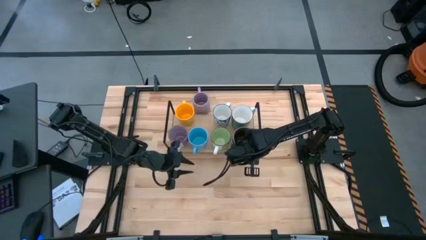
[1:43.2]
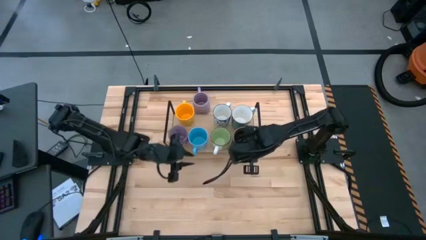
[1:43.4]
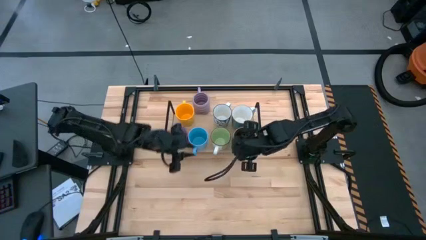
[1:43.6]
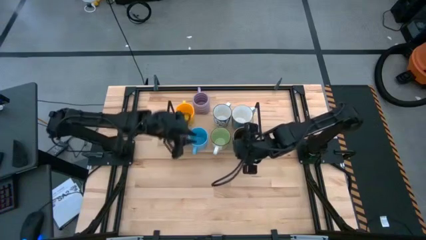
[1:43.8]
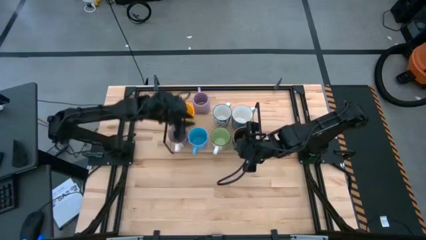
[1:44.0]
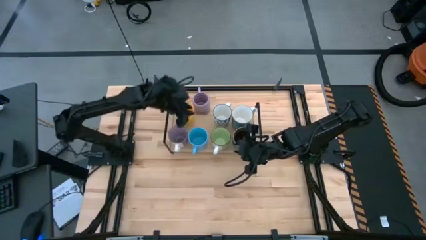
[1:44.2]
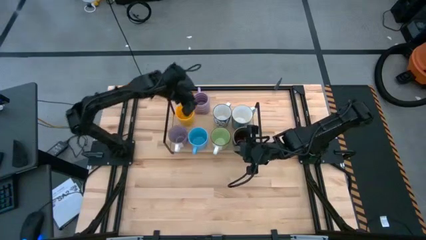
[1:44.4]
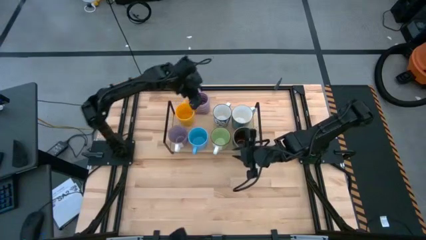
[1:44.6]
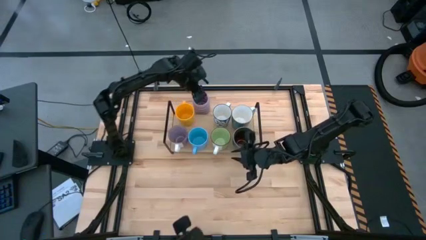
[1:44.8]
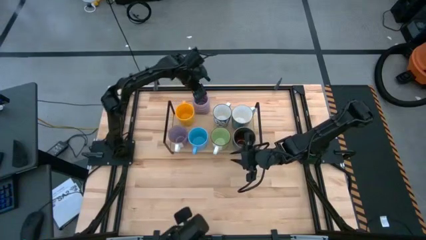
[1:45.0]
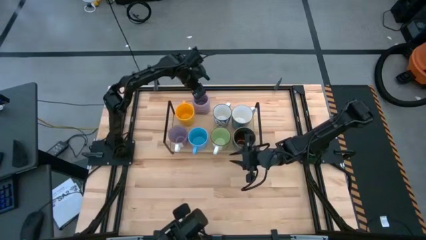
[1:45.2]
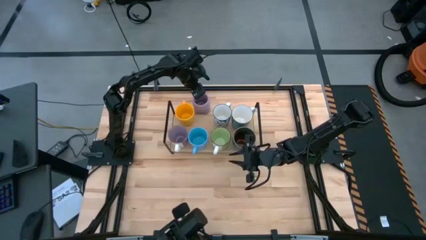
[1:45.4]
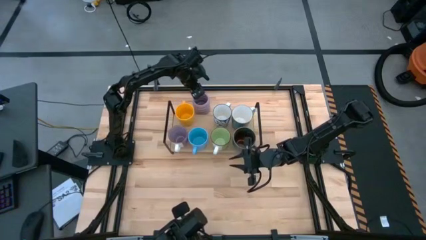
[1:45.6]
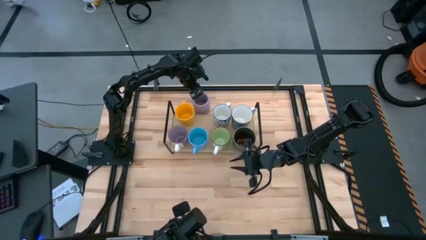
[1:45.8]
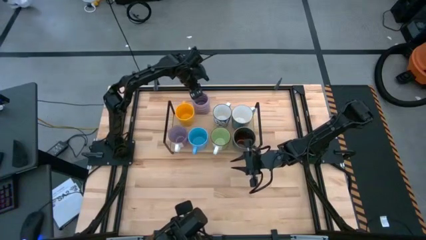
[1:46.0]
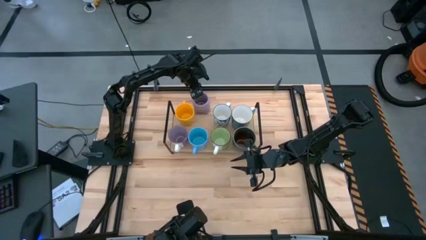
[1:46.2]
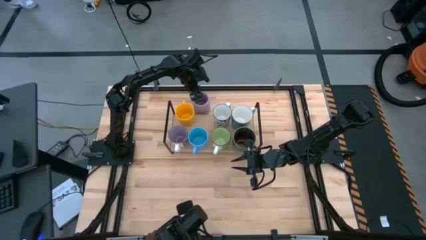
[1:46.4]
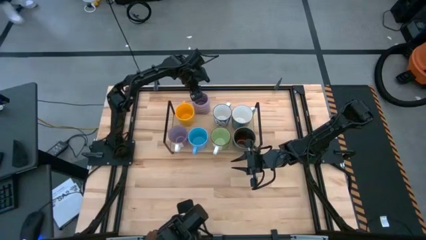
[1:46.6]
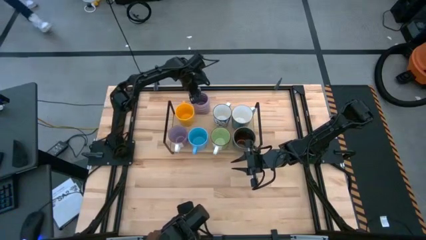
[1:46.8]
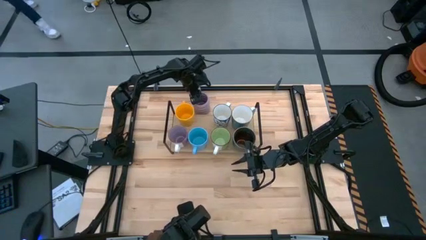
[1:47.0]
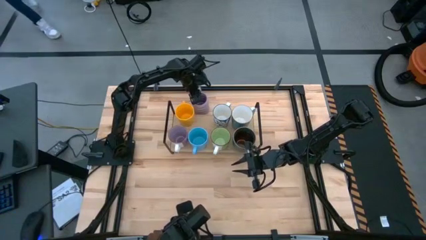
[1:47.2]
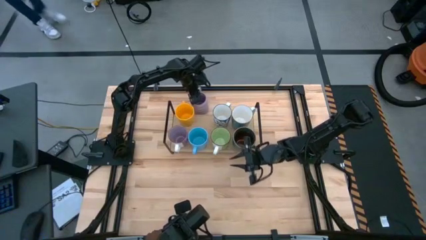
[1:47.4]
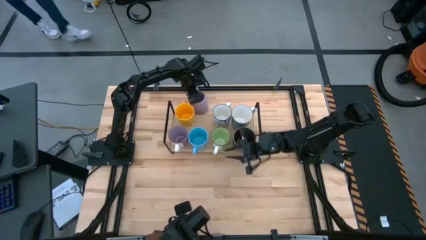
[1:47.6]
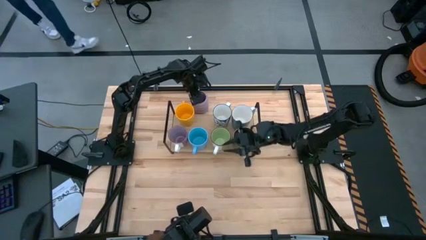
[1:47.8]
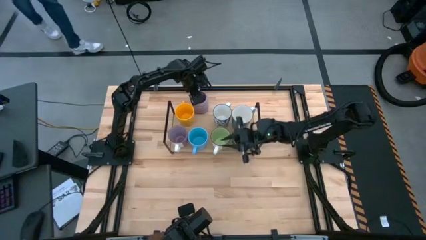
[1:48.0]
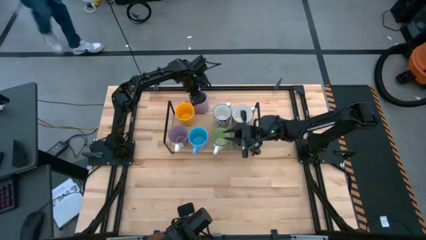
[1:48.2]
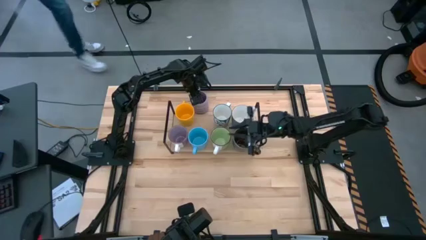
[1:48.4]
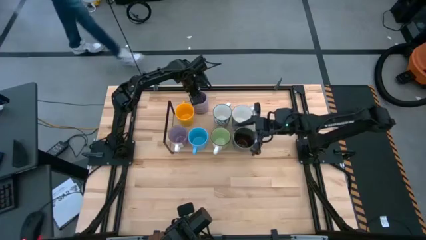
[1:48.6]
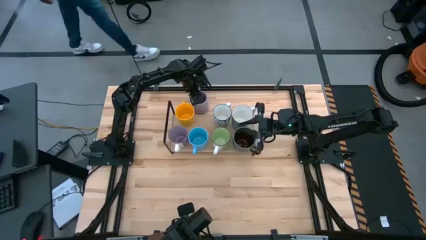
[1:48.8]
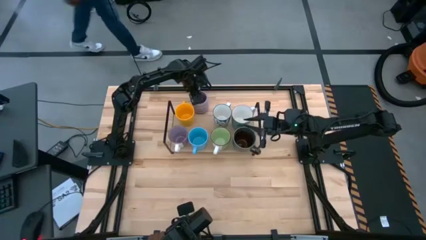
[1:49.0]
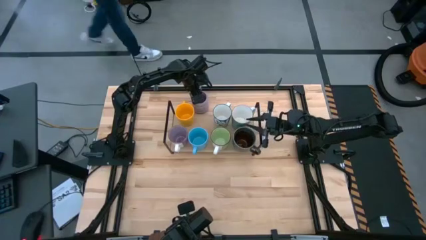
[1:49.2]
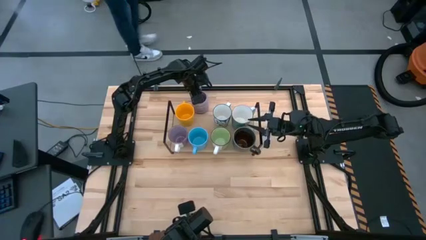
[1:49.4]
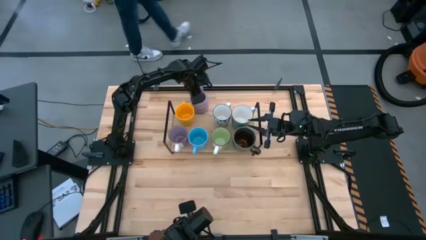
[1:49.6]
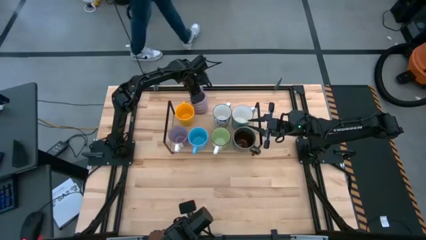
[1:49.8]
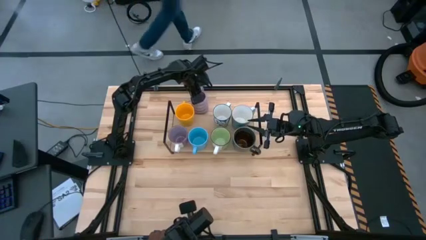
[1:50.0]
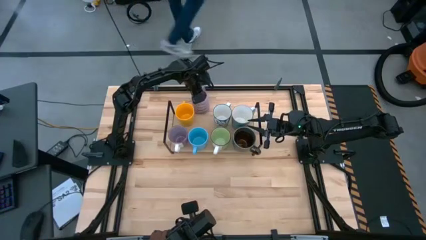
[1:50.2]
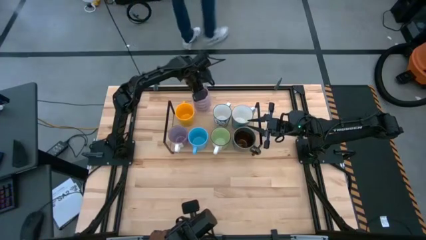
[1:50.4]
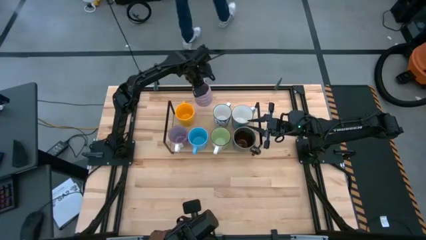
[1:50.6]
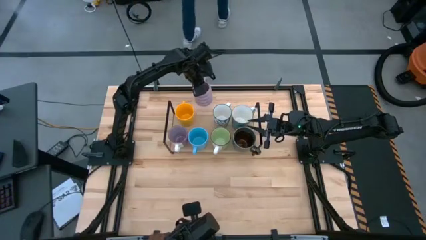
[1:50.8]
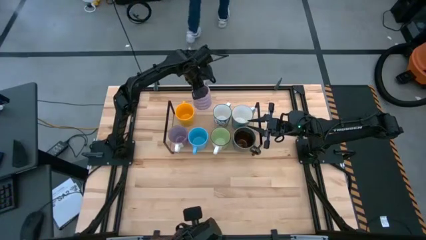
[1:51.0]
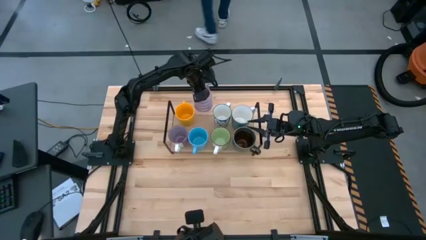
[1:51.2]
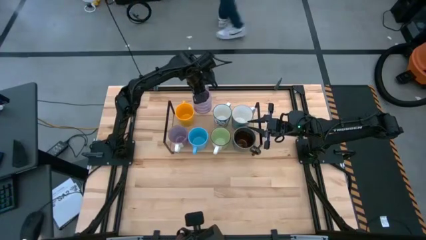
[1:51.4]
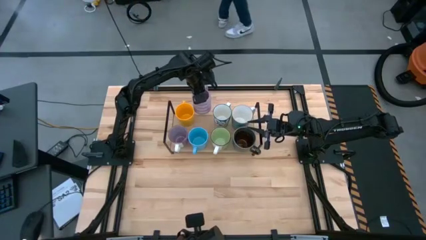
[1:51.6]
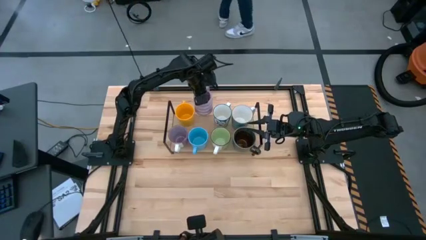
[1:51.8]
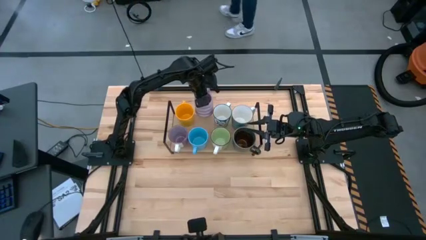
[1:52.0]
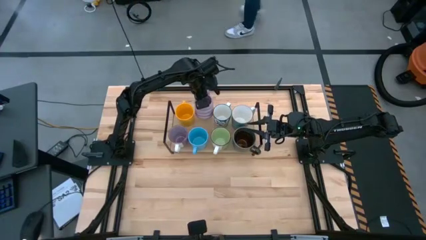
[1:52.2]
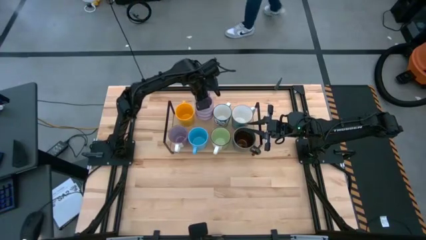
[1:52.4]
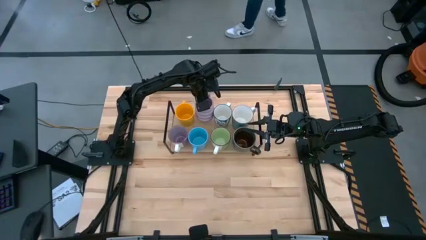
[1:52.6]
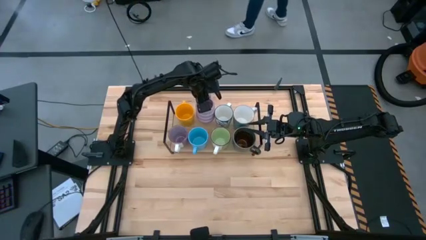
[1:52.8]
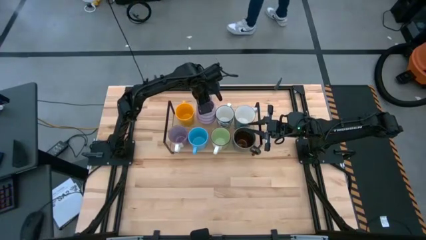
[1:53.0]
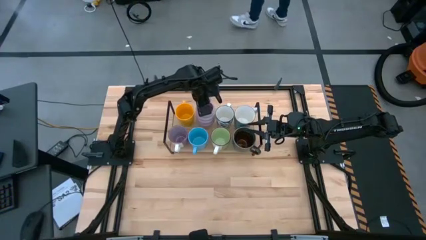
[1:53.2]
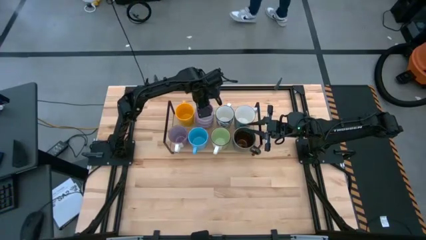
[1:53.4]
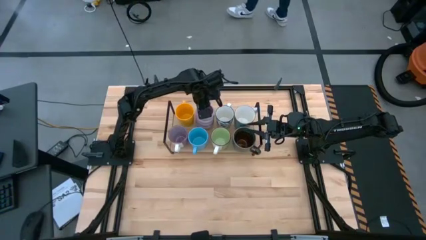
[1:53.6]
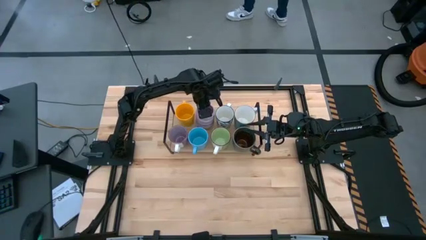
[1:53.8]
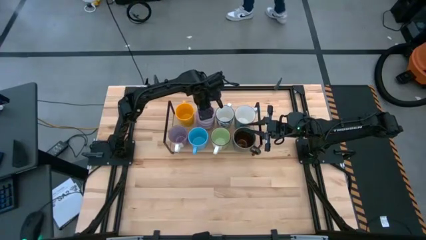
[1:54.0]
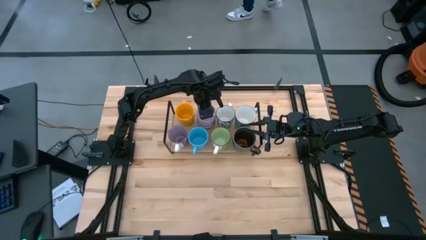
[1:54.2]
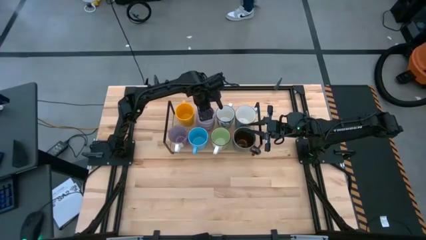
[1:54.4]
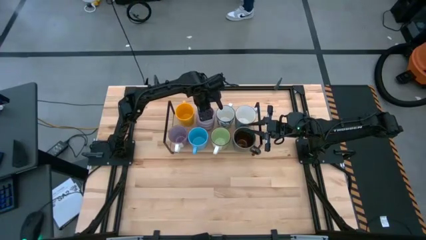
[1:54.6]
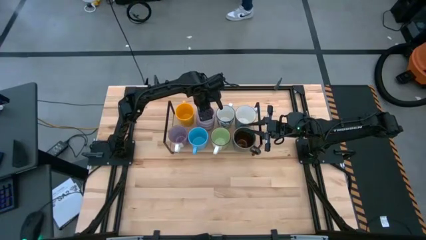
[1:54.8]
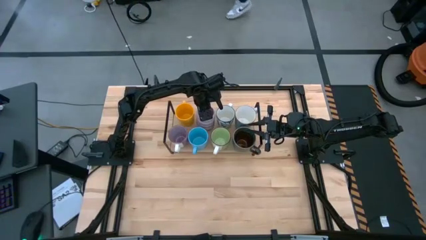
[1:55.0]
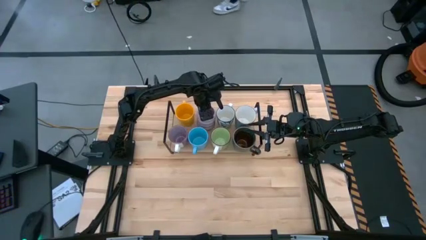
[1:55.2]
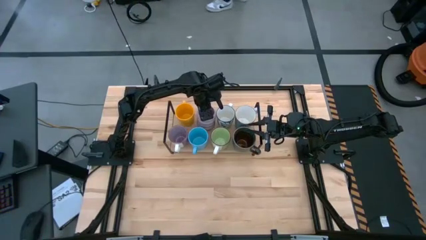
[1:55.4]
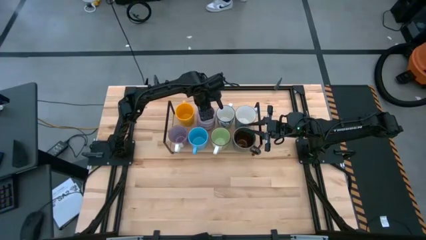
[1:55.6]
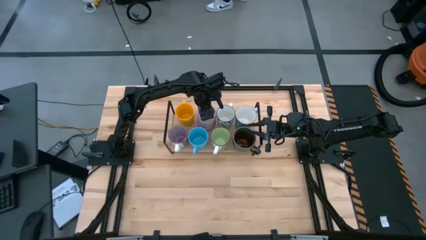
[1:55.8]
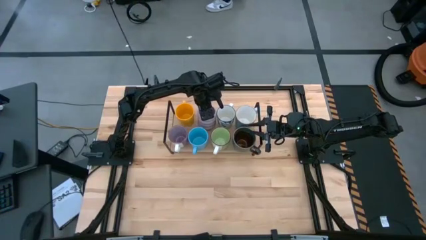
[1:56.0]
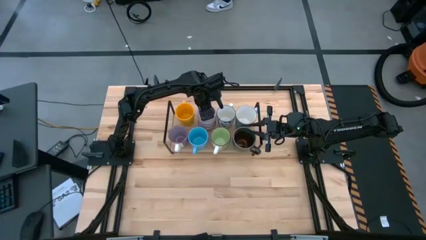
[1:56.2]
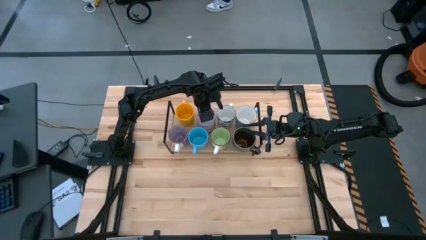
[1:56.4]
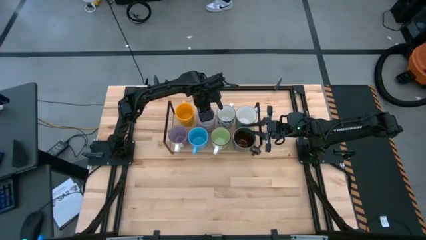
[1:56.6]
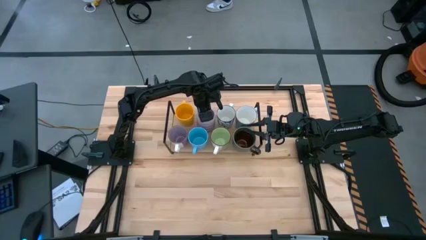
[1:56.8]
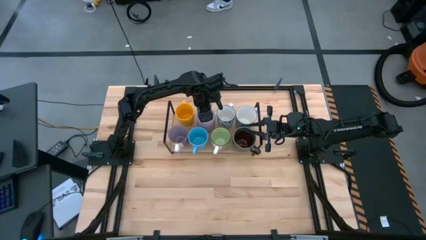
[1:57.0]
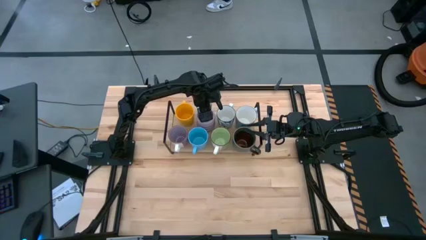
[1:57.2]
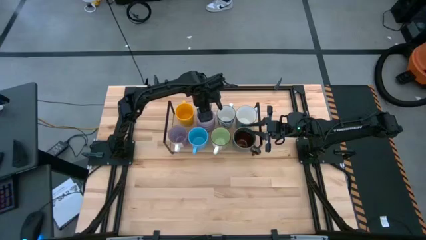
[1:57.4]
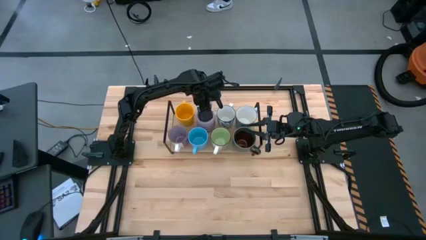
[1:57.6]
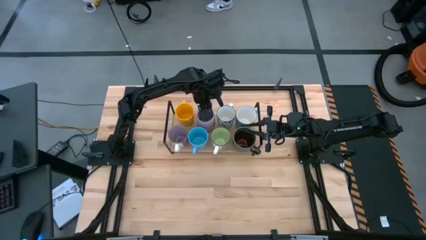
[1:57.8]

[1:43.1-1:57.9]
Task: Place coffee mugs
Put the light violet mug on the shelf
